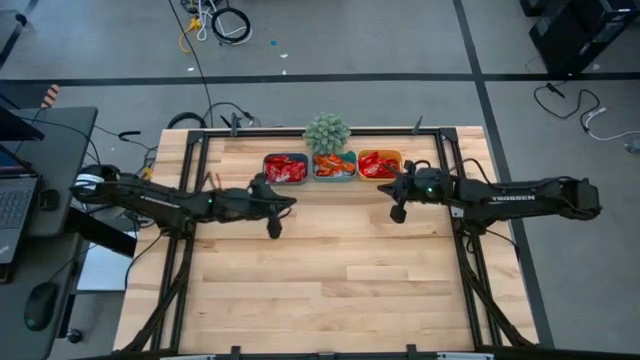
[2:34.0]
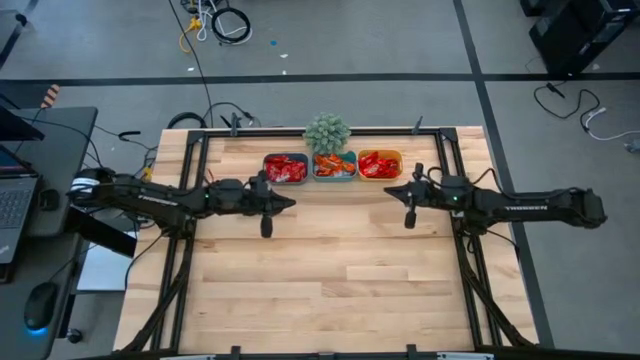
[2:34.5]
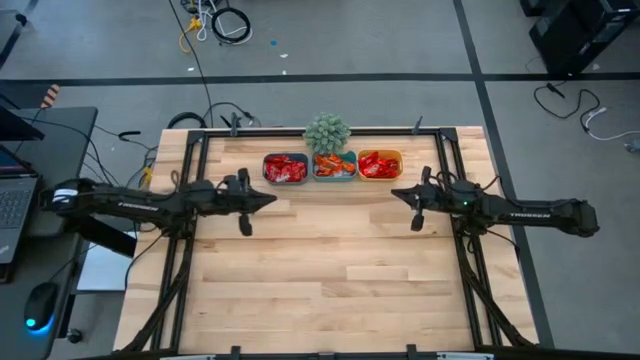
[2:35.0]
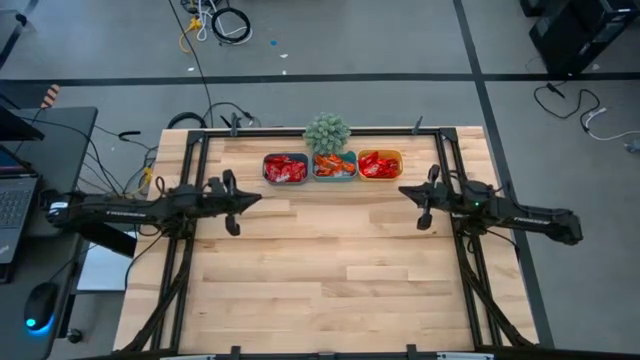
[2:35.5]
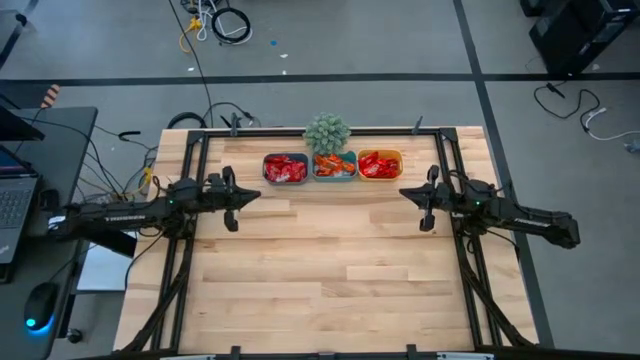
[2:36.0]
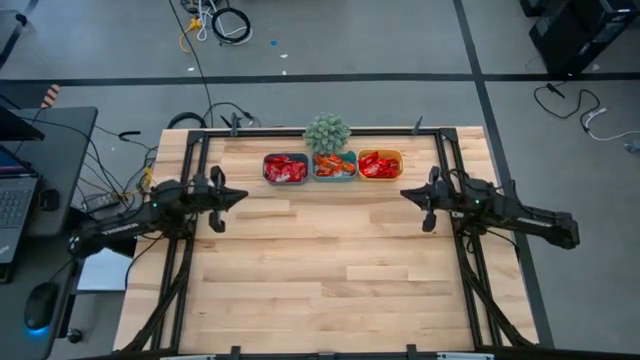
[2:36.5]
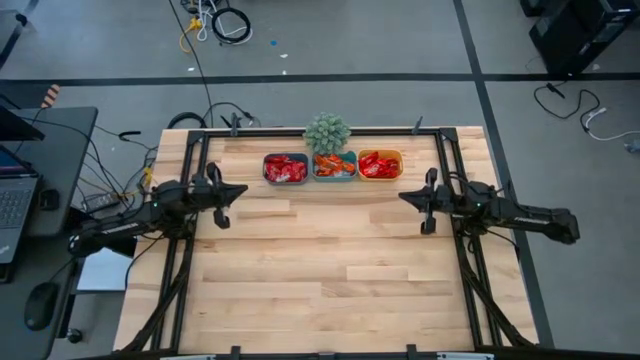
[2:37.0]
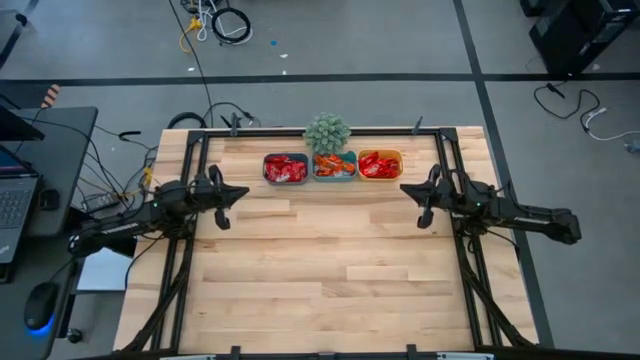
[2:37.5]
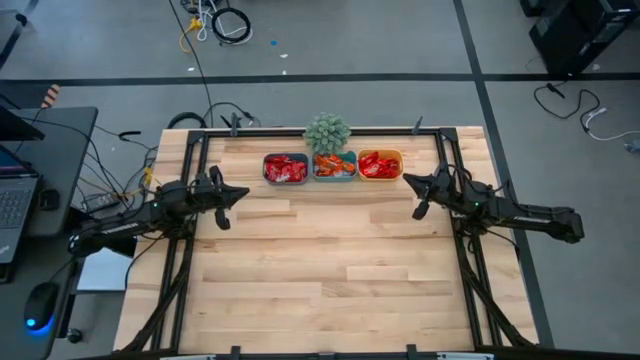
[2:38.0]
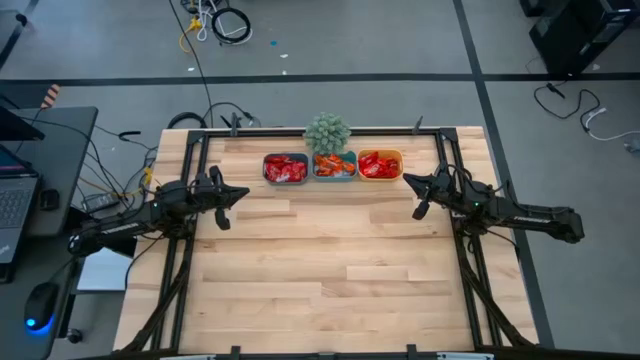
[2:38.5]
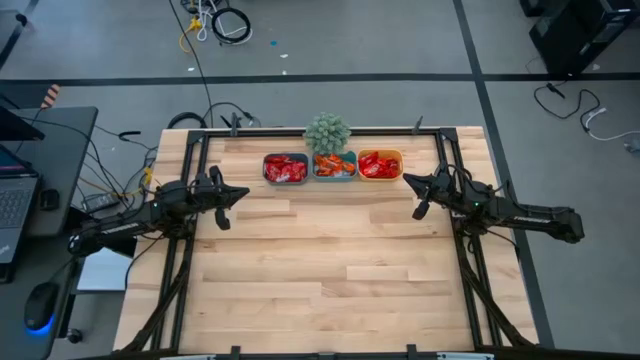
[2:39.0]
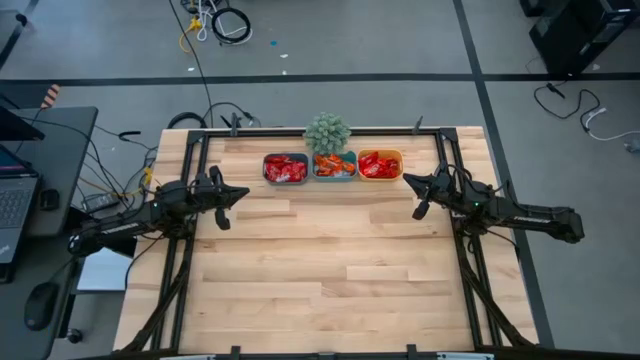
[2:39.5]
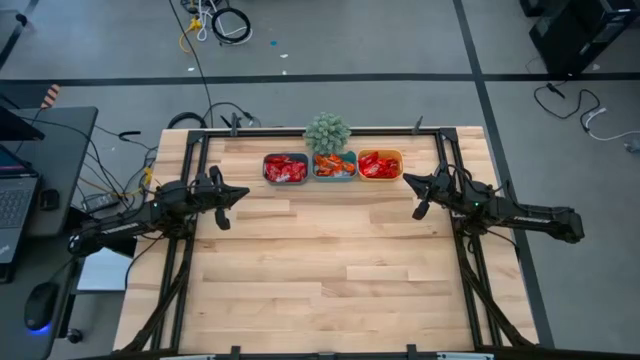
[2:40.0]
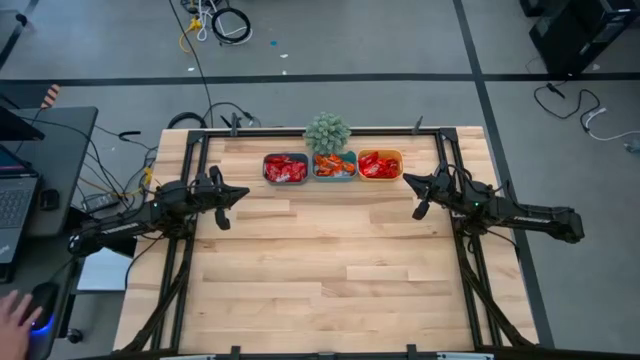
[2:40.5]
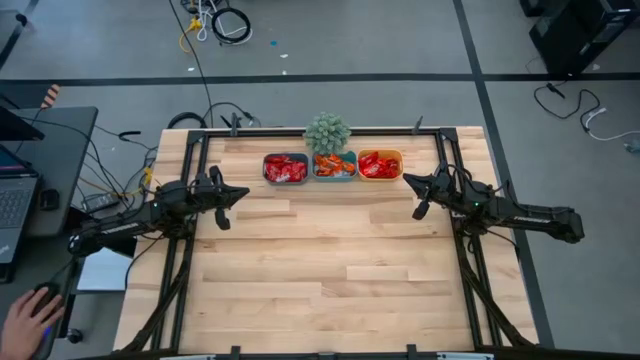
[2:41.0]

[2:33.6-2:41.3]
Task: Sort candy
Return to Home Position

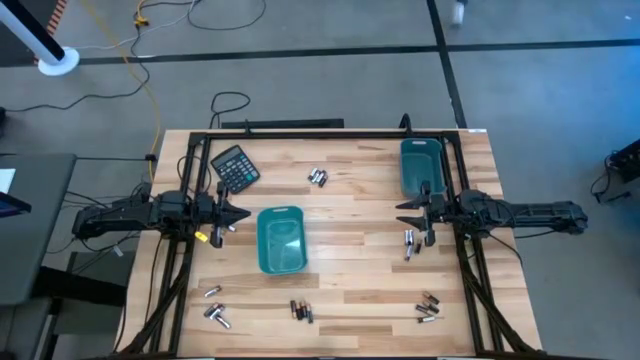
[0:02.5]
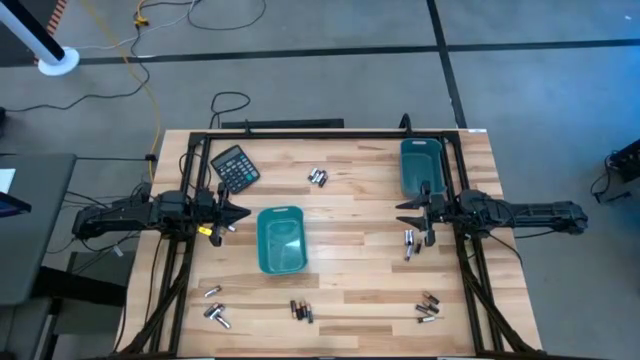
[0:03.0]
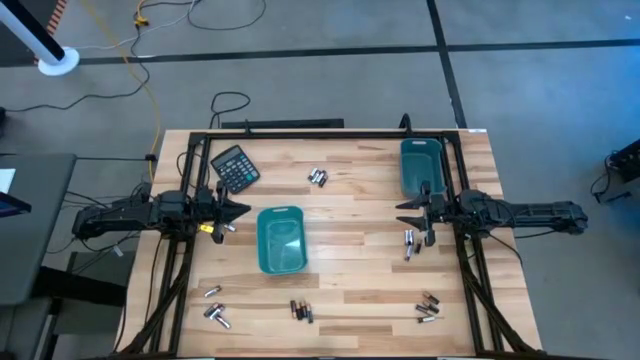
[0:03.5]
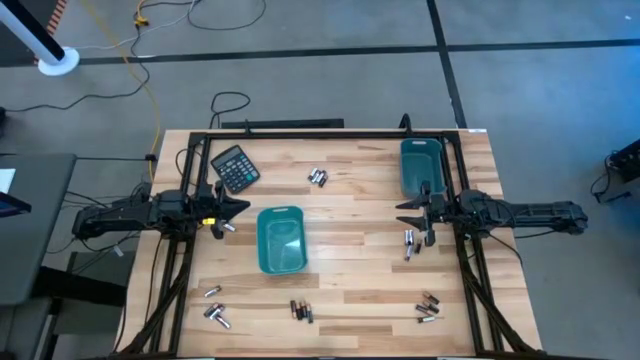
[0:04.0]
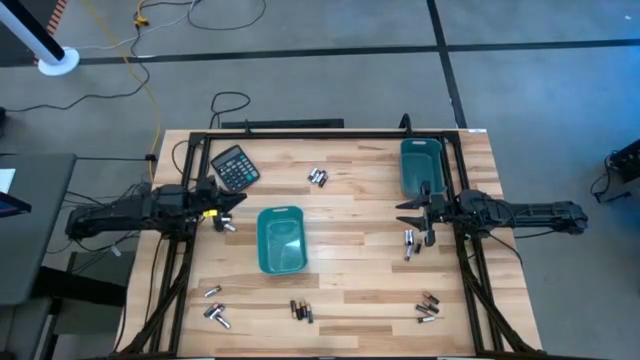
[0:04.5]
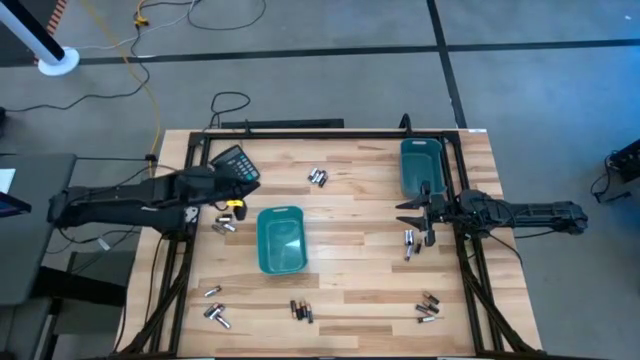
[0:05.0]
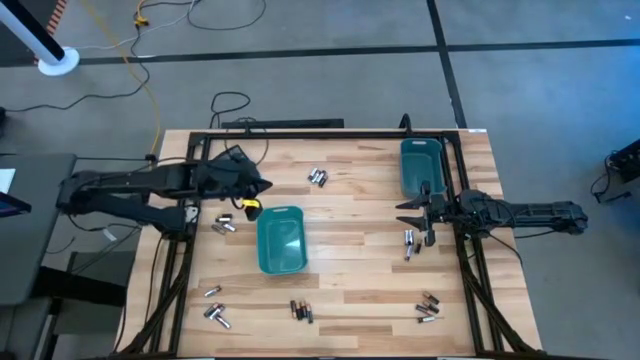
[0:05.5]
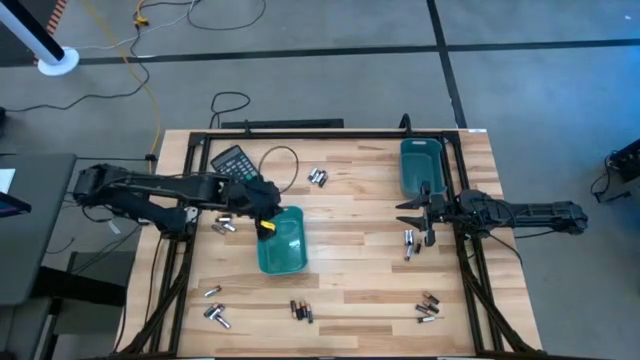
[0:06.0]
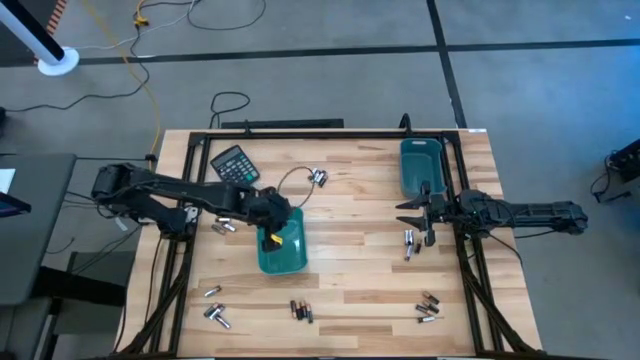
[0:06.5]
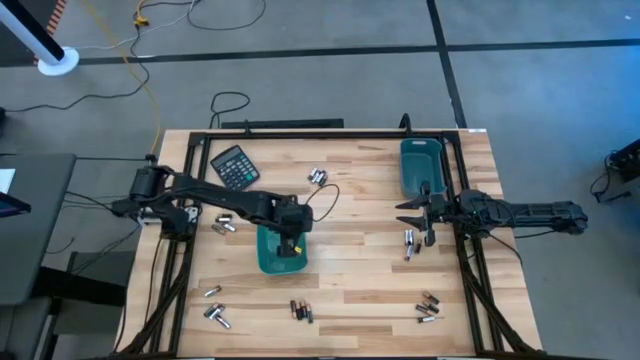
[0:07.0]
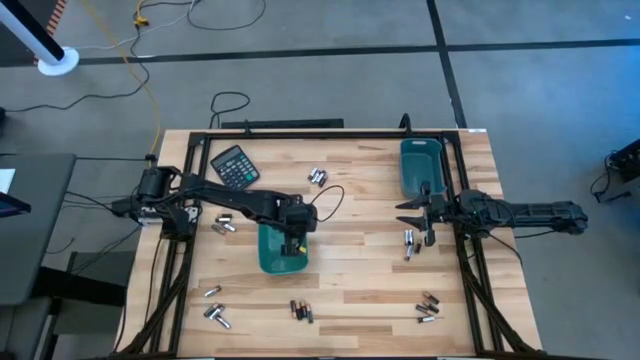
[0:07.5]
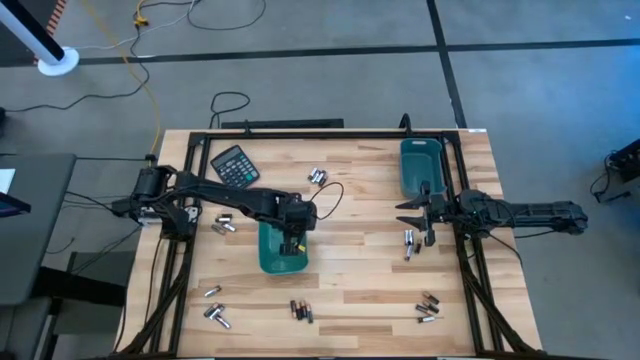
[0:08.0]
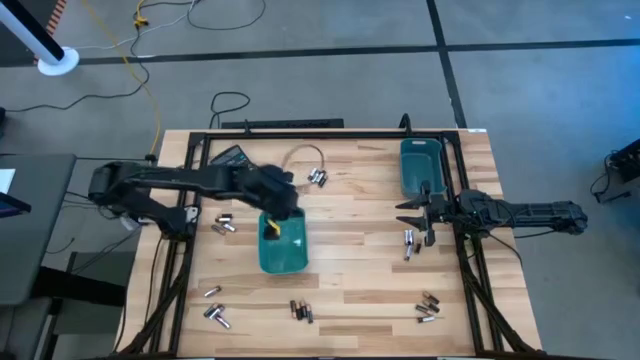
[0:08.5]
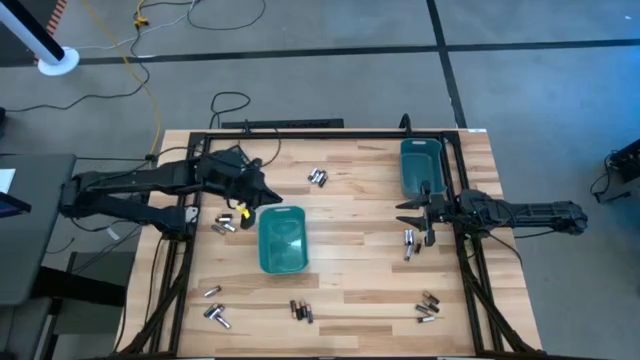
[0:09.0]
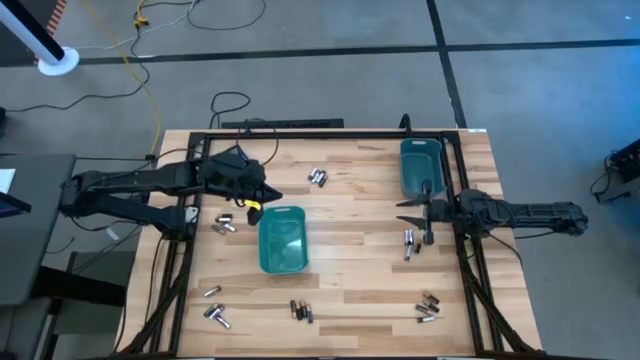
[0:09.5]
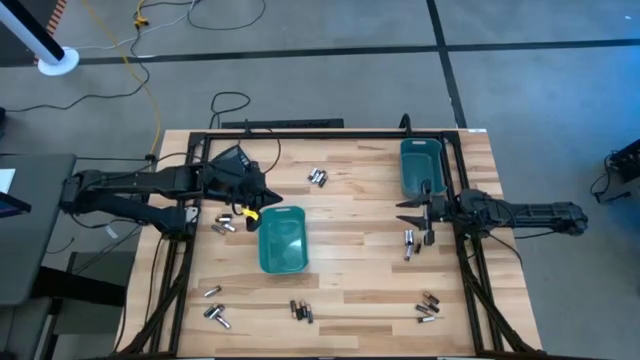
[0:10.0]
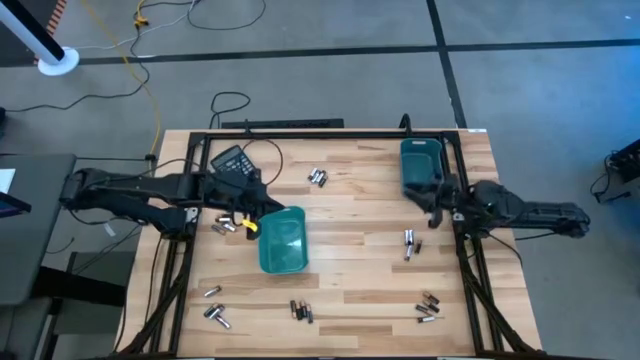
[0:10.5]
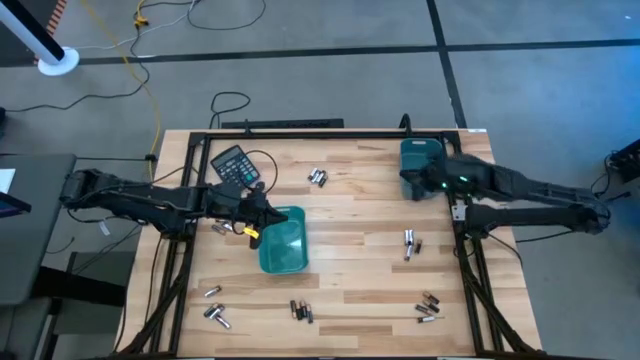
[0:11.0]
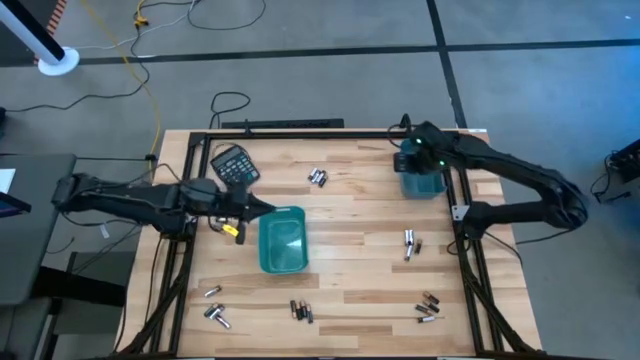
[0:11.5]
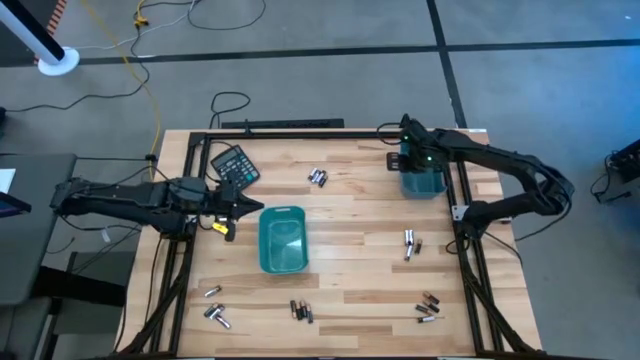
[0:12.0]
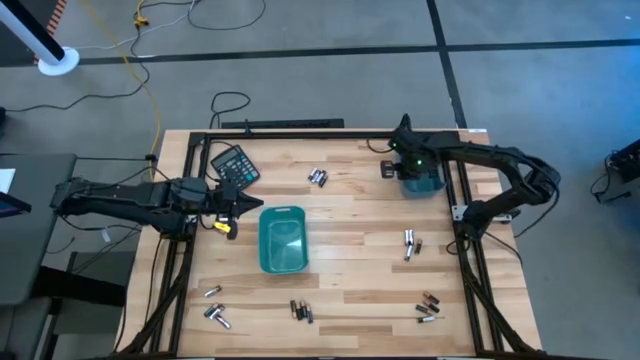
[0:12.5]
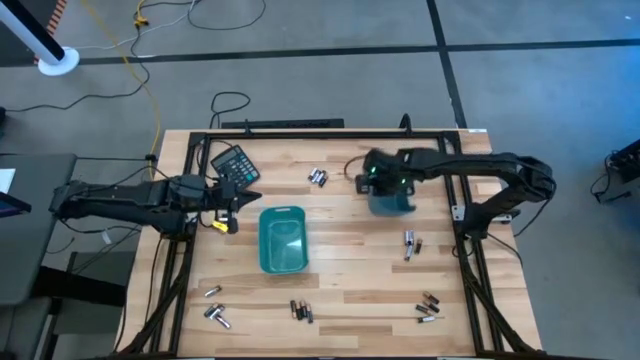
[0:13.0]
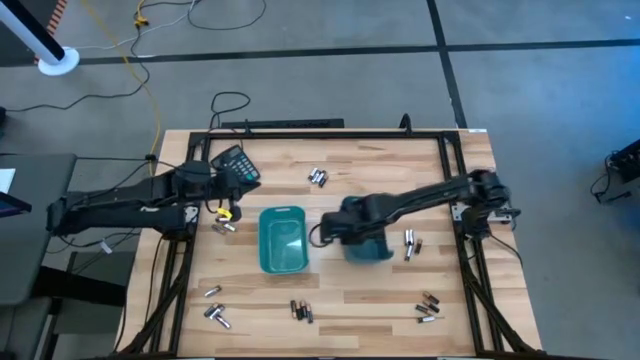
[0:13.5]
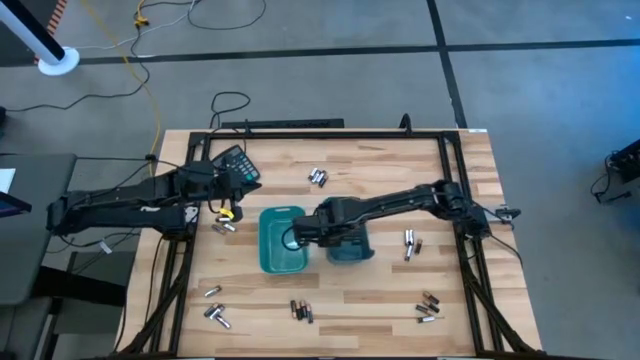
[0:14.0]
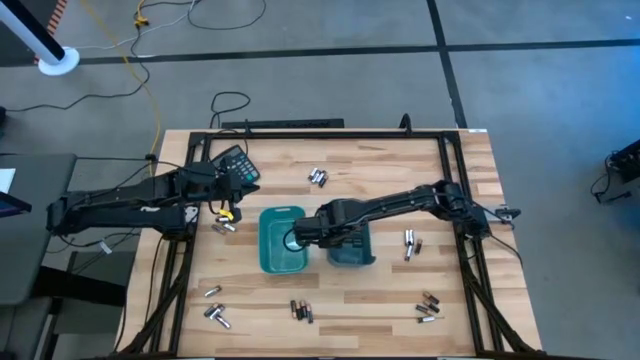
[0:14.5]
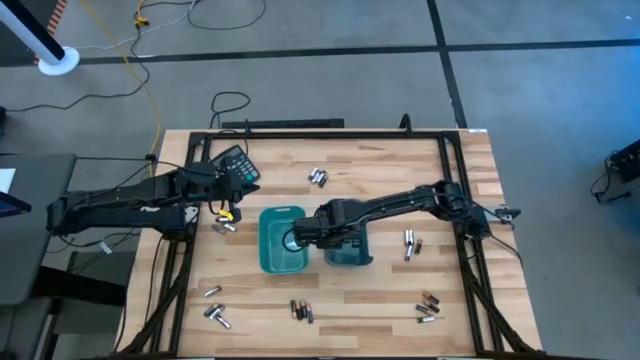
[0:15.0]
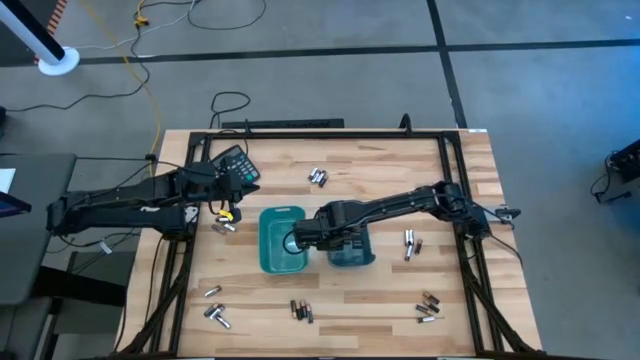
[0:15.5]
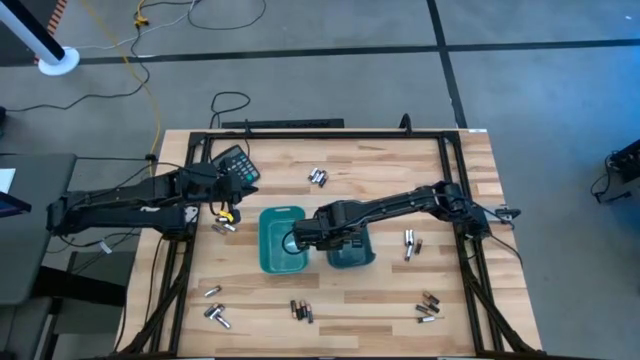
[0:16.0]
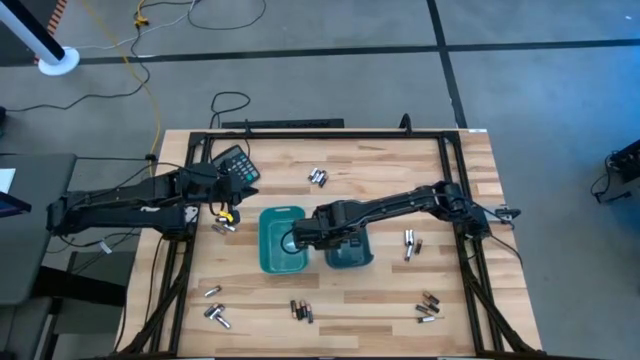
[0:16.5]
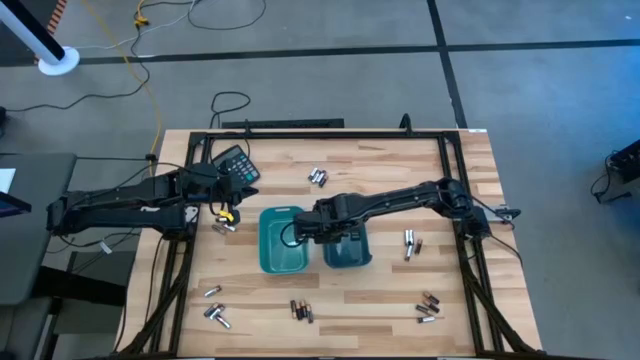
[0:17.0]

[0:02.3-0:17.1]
Task: Sort batteries
Adjust the blue bin
